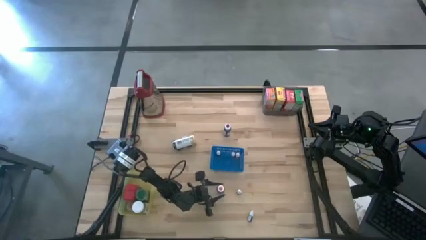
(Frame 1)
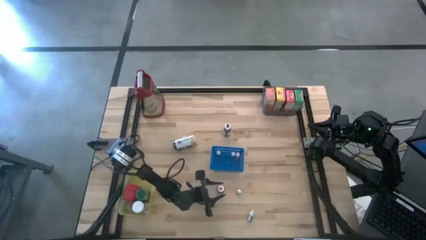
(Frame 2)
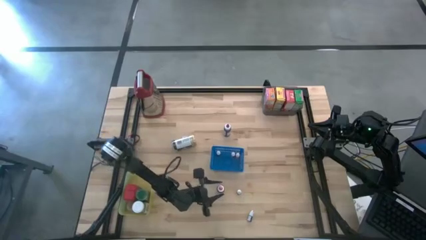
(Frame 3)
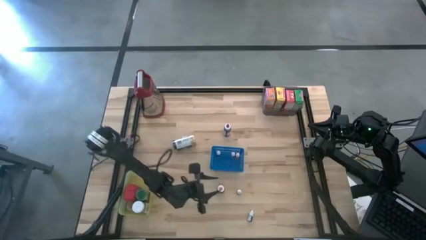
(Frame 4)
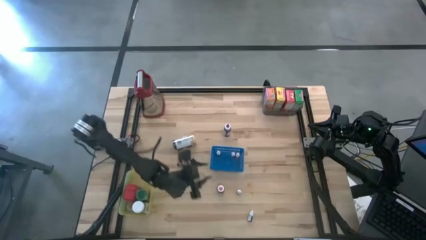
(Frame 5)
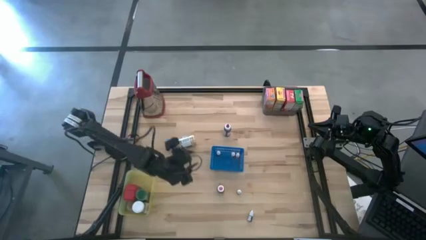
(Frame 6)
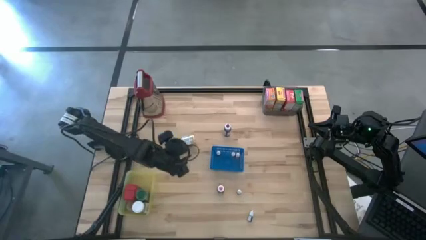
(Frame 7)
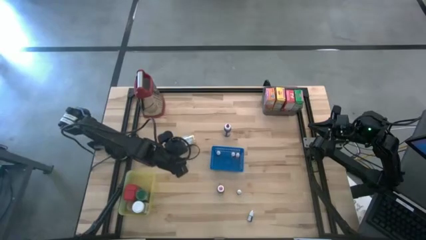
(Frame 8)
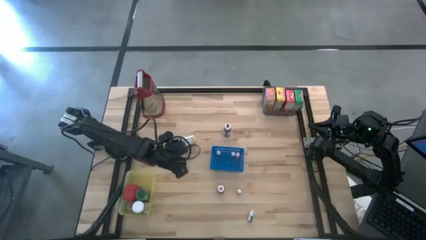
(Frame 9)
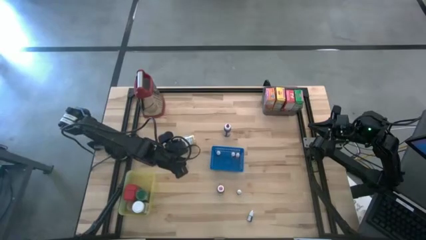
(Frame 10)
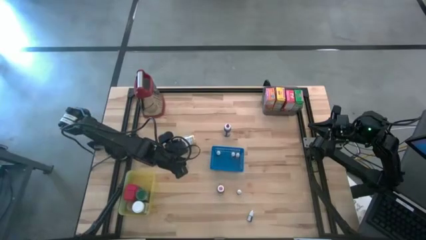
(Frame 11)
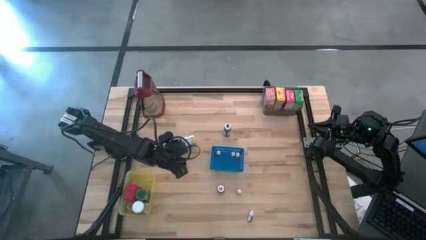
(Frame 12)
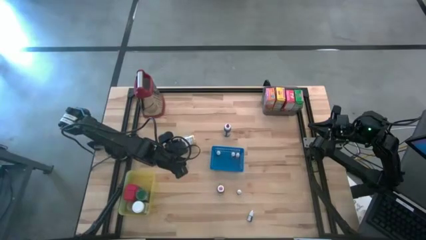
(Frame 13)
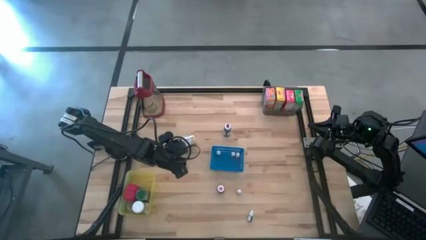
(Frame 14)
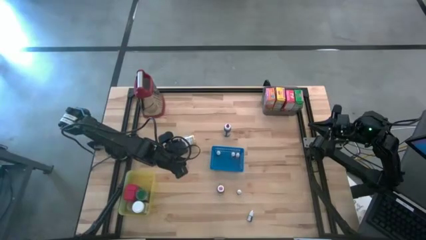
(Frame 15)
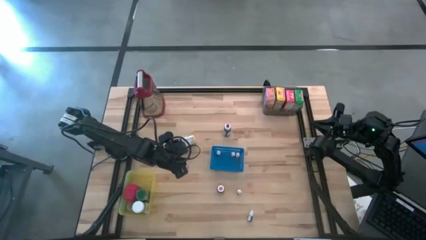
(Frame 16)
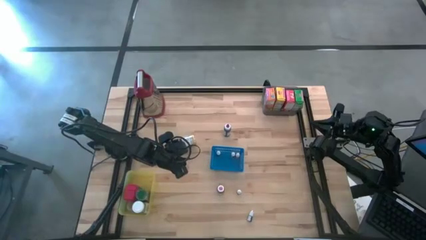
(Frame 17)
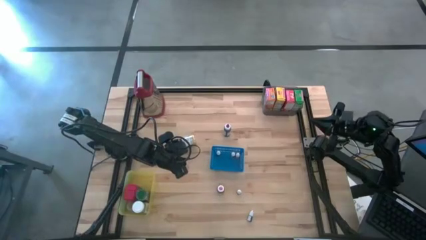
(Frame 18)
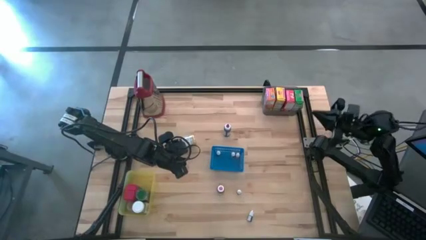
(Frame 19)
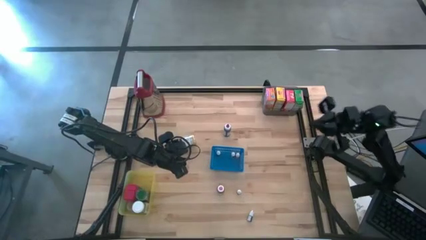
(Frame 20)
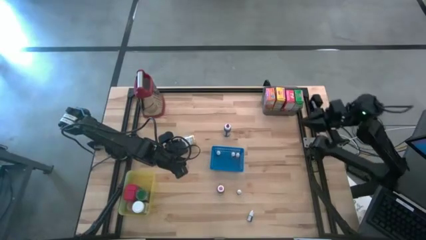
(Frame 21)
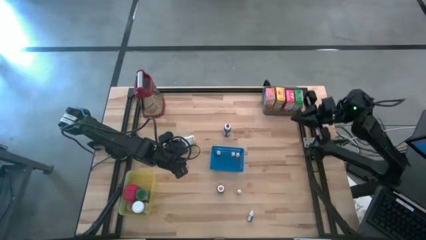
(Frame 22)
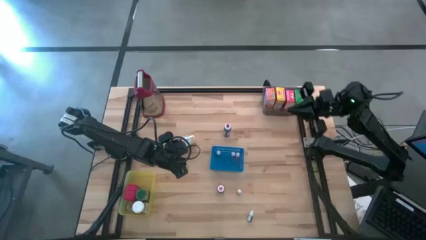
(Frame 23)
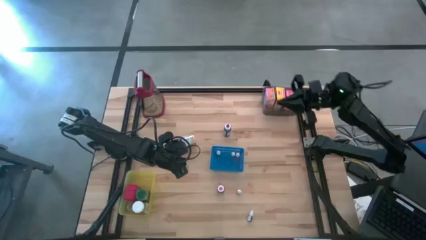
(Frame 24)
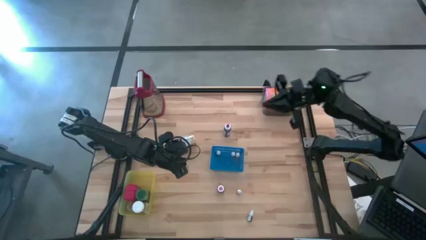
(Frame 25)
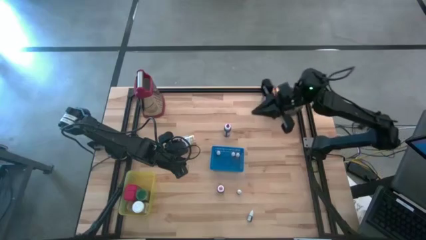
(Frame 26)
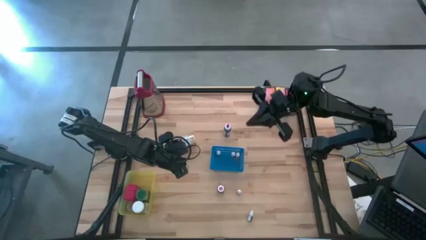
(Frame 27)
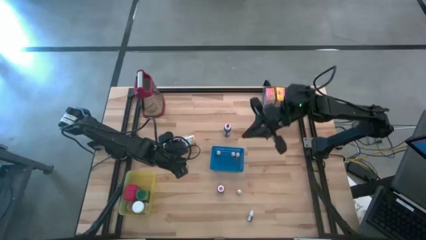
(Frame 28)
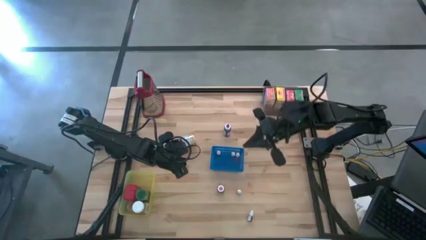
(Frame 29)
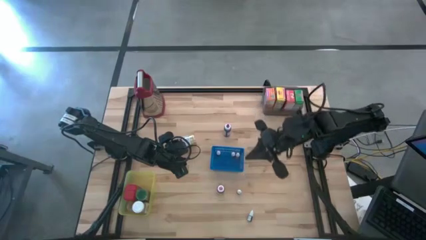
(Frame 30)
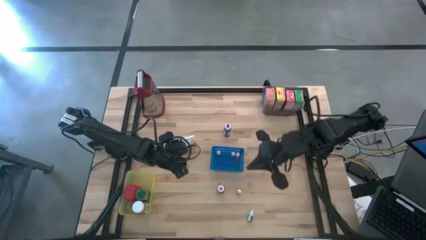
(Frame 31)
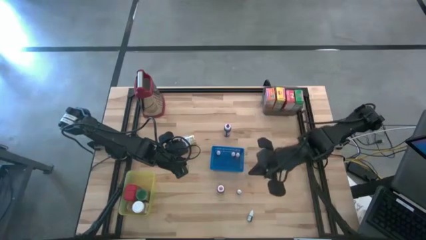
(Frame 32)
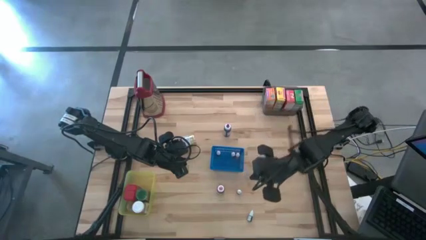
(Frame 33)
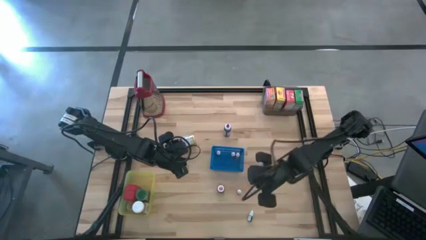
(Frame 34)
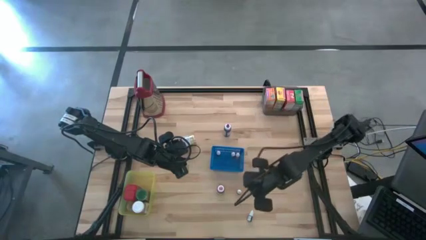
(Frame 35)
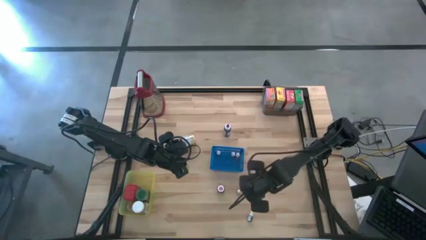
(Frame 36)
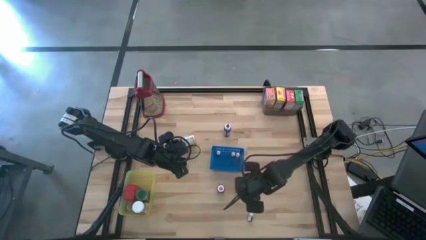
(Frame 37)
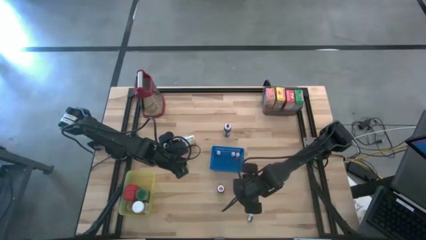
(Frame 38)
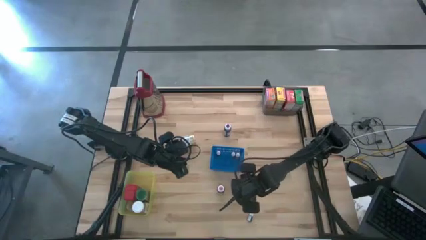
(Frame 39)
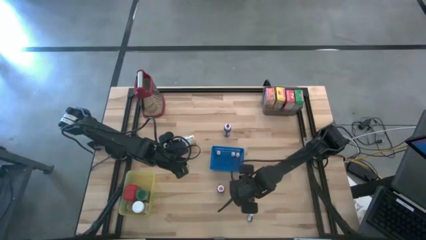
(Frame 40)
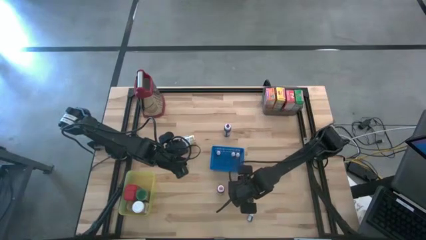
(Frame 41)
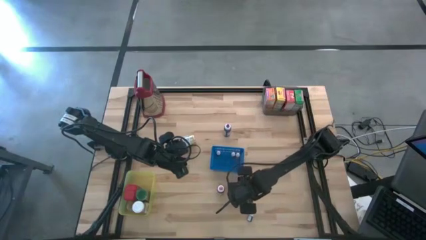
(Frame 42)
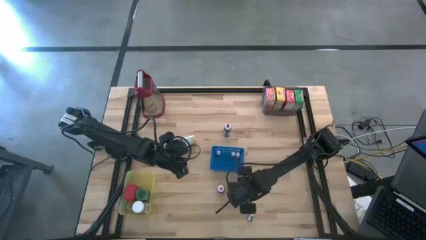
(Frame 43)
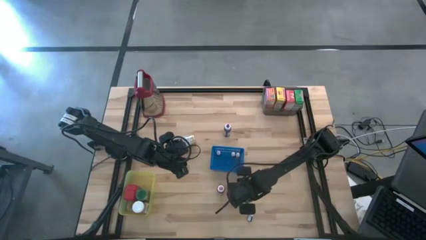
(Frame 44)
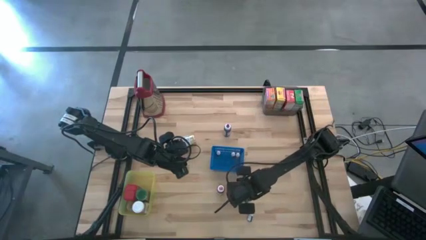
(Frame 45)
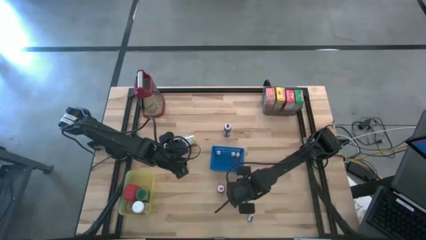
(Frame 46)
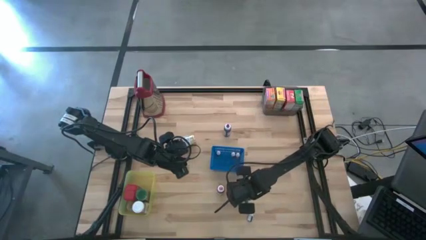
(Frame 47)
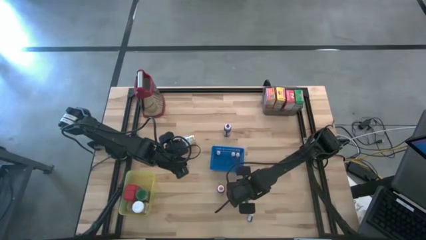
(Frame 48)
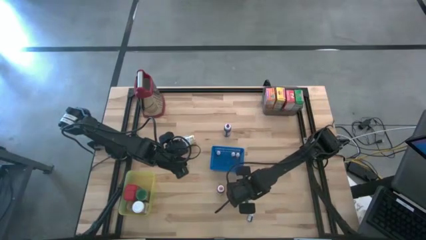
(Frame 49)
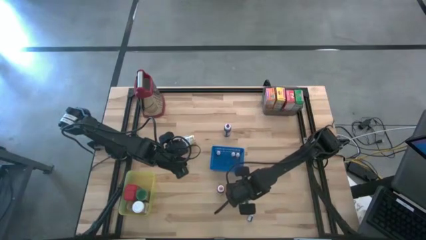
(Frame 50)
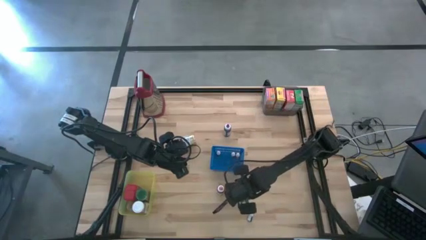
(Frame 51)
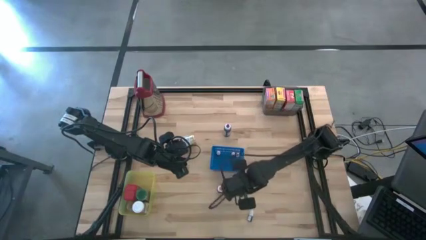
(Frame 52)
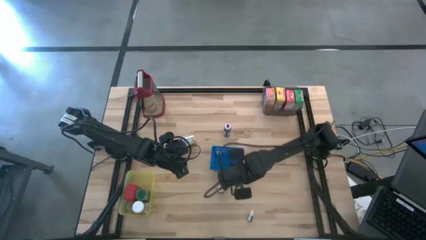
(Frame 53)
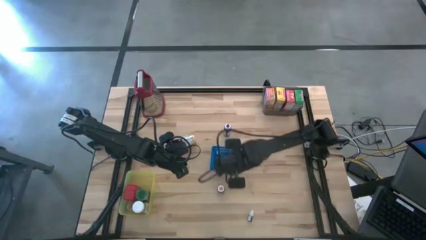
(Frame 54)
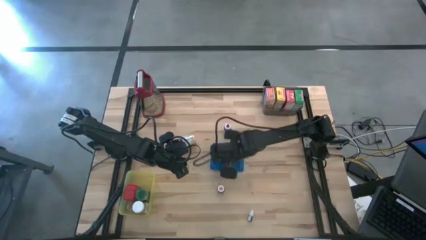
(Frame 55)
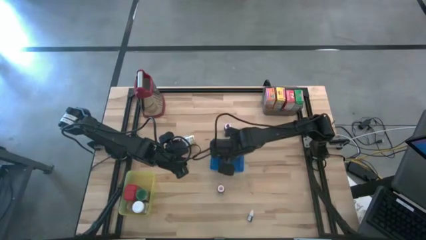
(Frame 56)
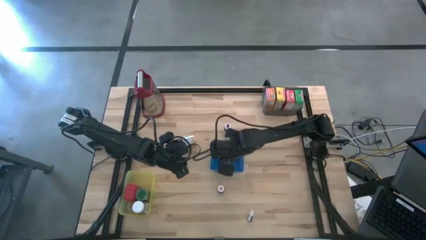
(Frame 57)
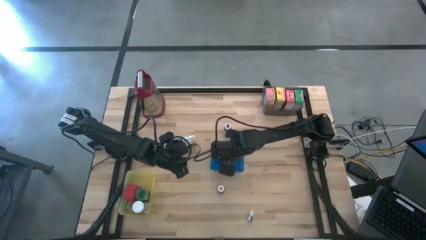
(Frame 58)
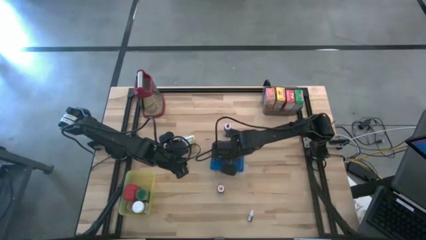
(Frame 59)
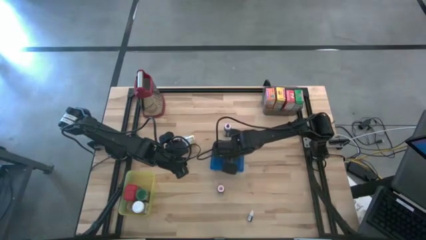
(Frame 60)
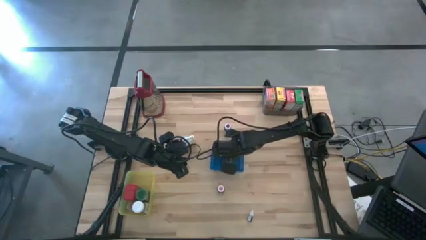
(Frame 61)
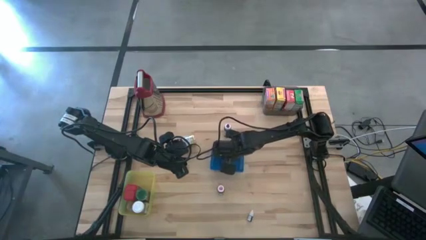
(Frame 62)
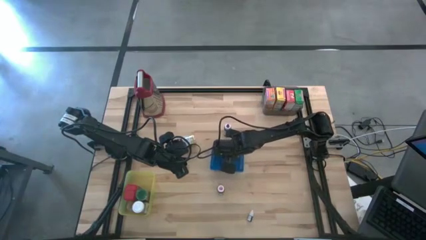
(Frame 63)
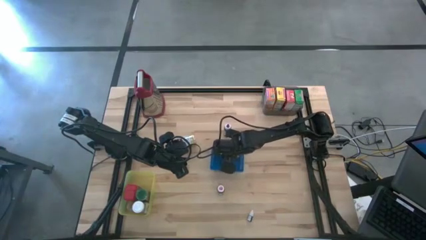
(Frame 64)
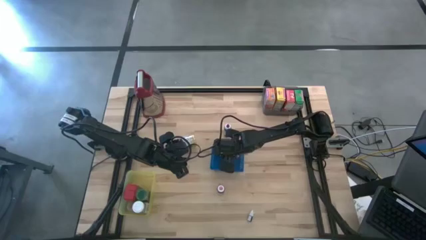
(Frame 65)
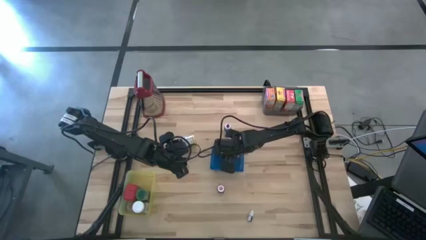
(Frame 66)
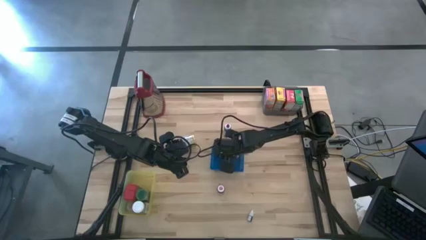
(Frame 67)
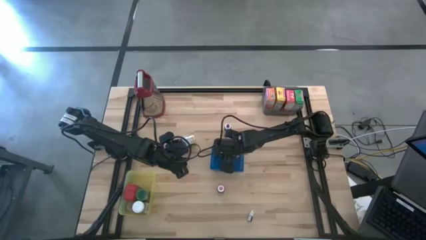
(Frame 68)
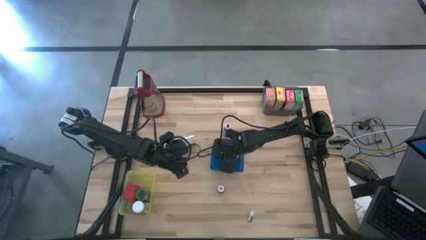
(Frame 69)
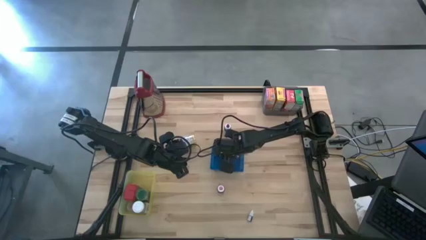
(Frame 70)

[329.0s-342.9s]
Task: Pick & Place Kitchen Items
Put the small blue food coloring bottle into the blue bin
